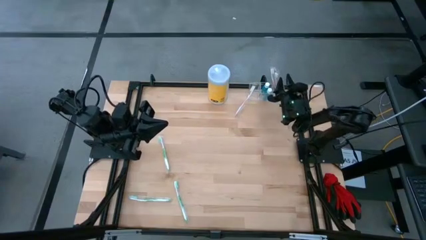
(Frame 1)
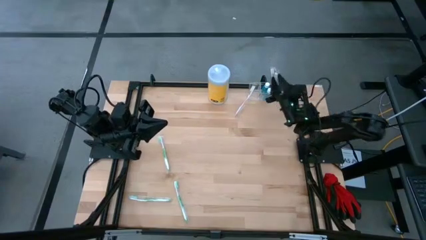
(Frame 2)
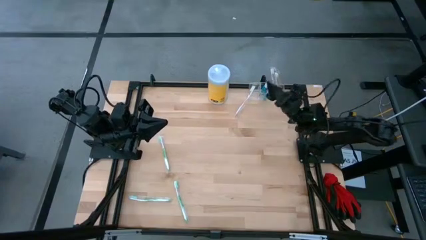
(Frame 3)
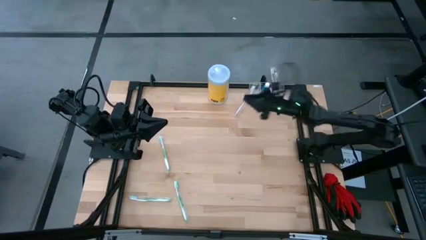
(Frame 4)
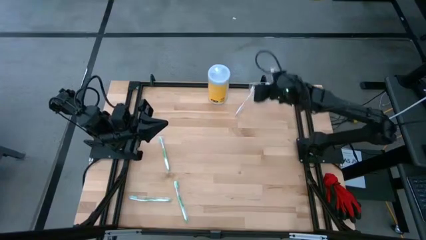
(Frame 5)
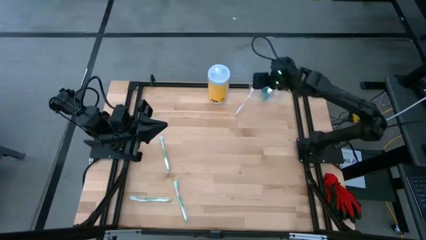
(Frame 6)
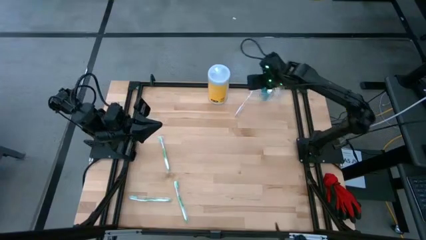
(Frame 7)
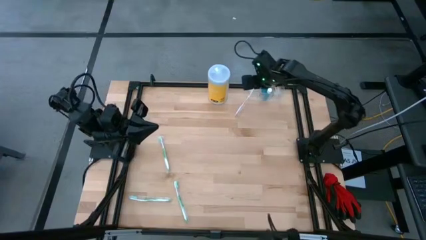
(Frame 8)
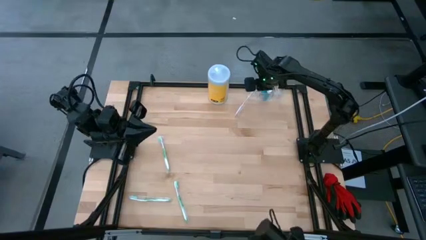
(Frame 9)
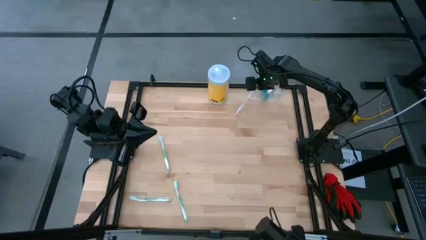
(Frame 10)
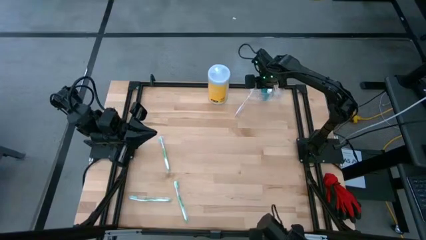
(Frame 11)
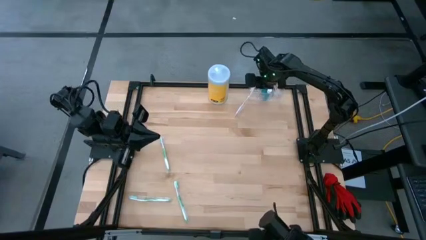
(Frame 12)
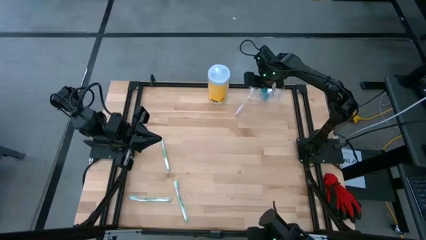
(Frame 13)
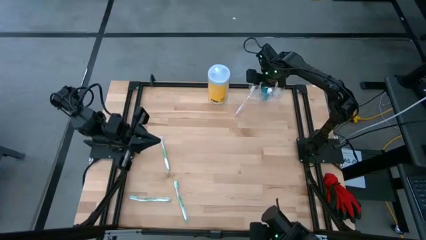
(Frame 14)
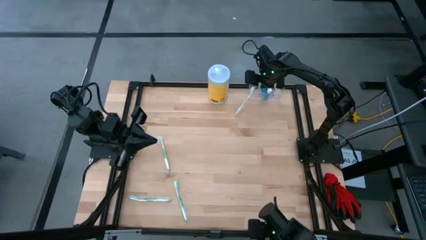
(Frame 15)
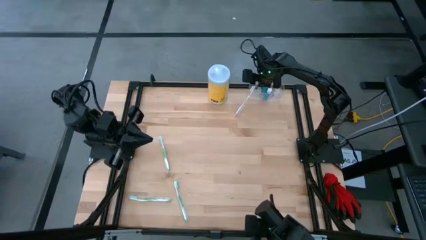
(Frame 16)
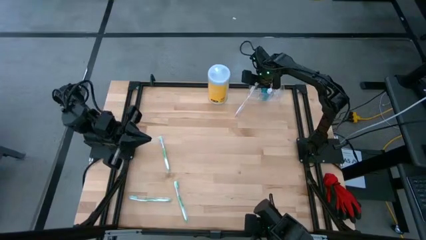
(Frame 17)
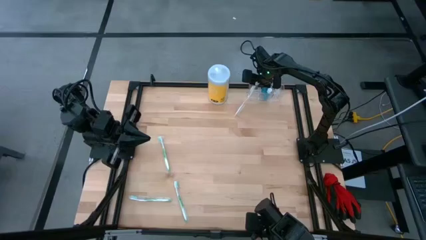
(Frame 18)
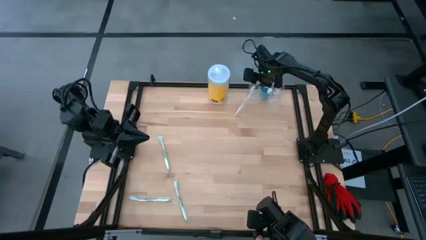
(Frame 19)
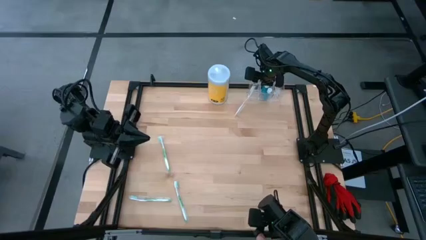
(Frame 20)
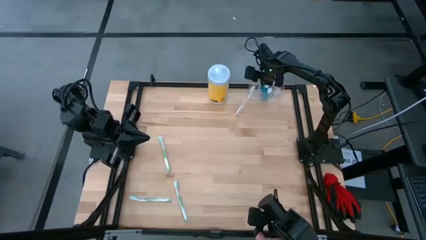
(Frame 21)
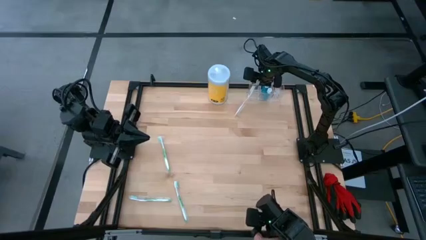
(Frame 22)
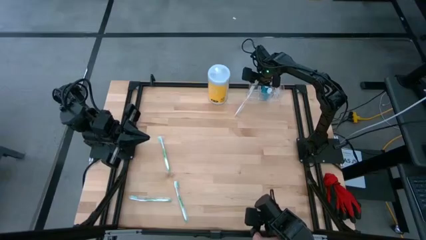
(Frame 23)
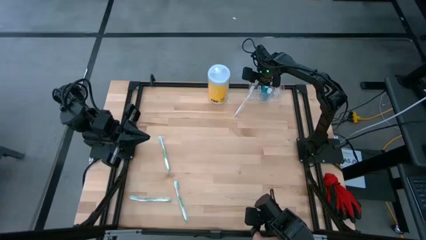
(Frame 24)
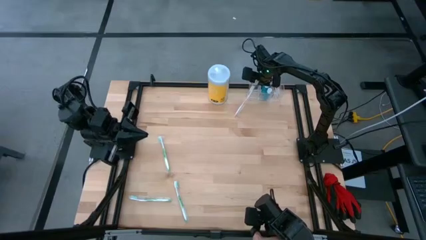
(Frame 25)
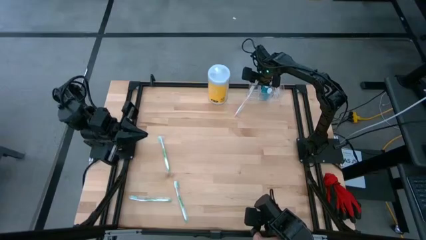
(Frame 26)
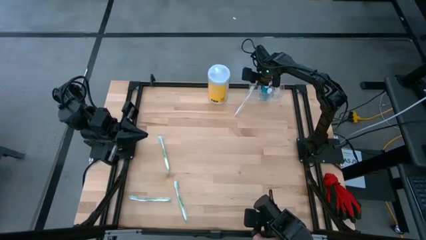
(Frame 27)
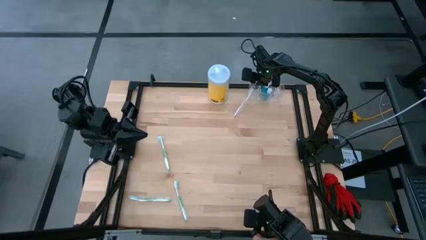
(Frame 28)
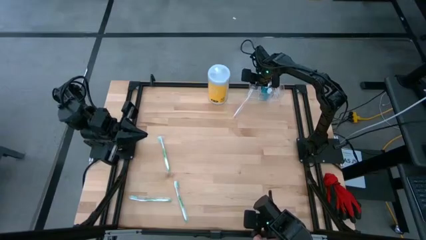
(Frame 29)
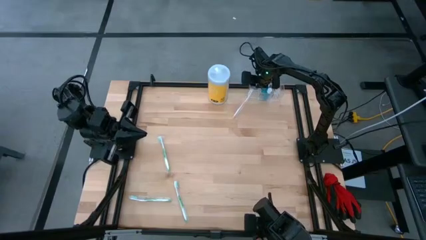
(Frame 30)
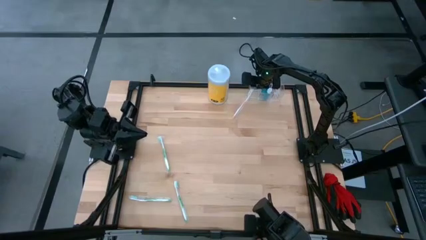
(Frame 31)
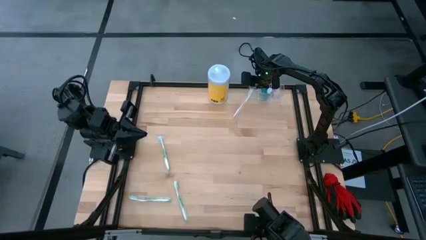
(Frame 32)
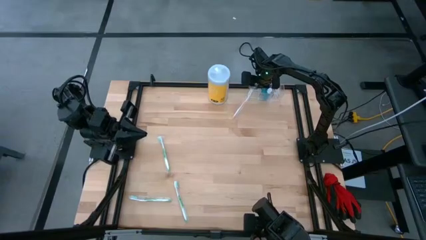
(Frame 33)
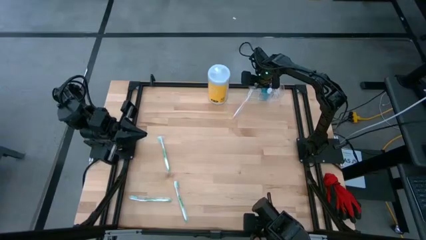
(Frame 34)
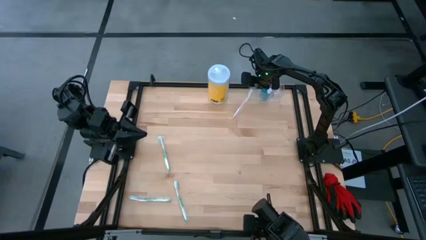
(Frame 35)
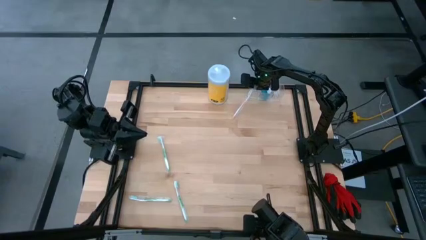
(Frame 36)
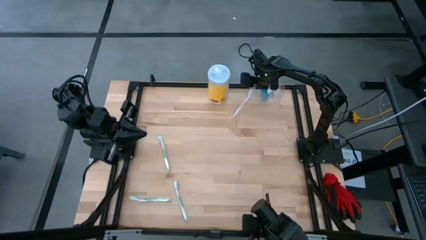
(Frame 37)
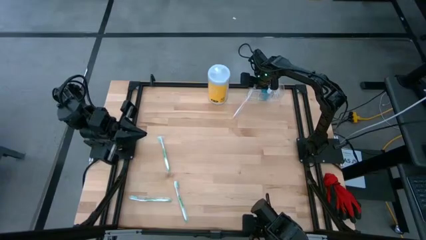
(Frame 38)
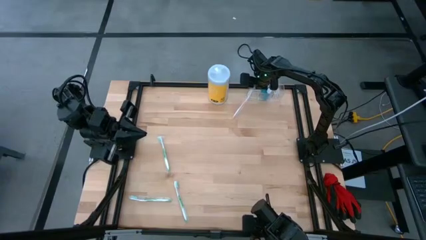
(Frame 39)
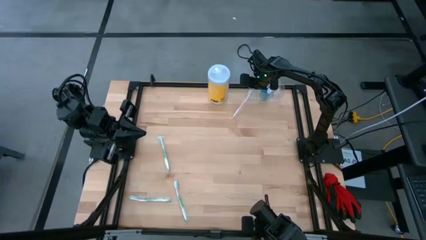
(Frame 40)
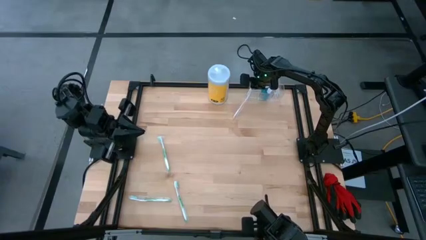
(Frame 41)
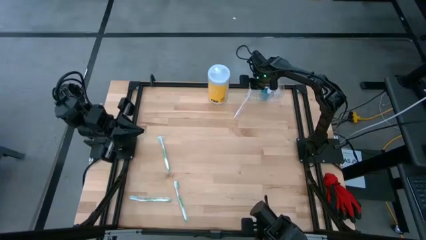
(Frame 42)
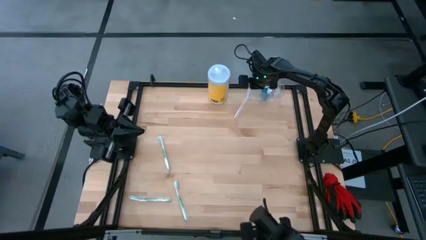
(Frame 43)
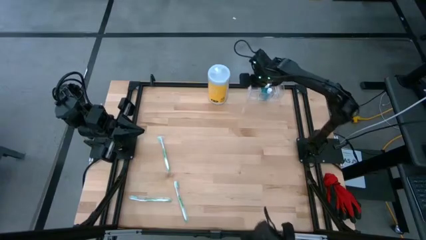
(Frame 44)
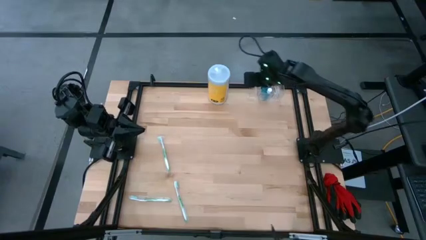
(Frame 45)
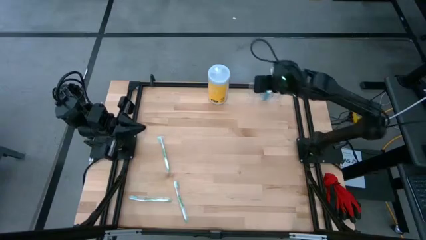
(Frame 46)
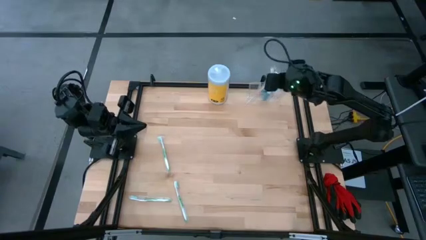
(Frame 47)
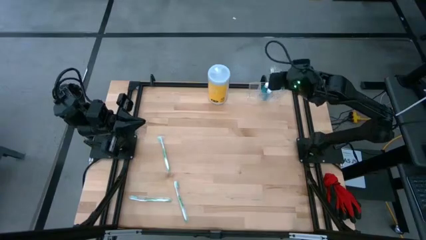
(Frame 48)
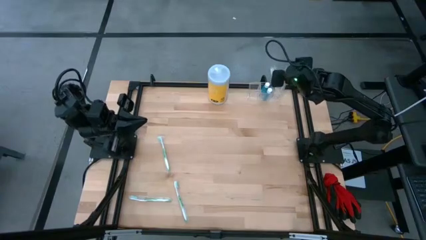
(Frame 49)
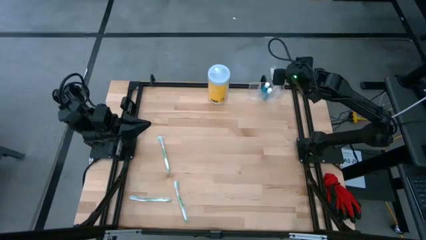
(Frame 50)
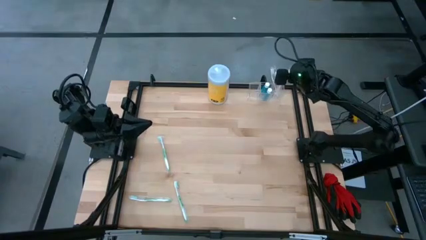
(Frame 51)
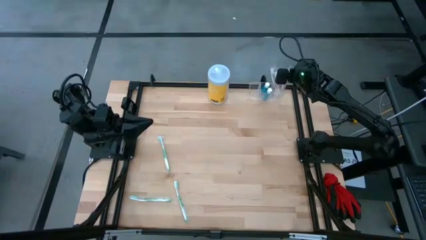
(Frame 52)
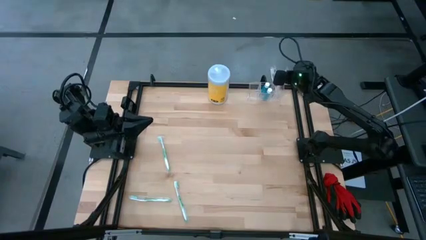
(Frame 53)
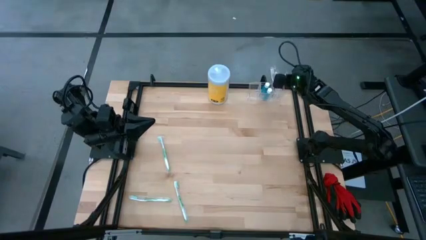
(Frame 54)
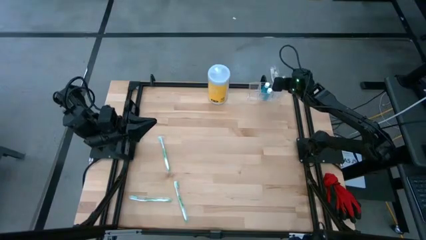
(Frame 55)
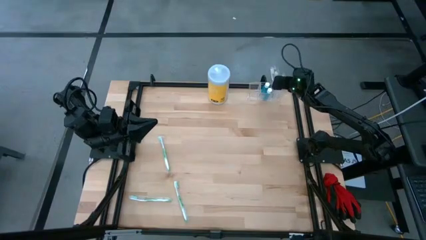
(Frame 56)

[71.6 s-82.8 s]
Task: Pick & Place toothbrushing station
Put the orange toothbrush into the transparent organizer

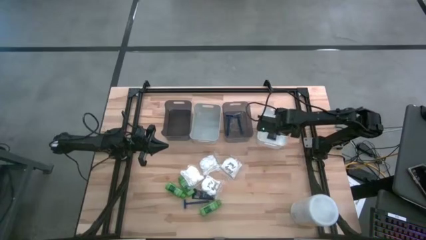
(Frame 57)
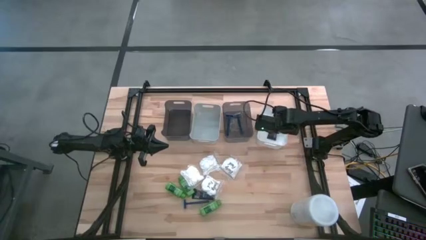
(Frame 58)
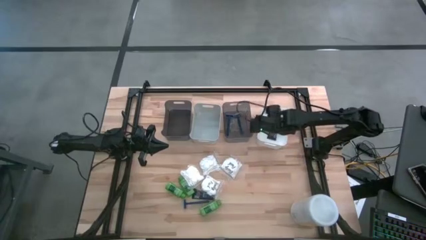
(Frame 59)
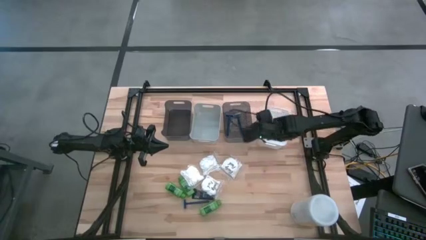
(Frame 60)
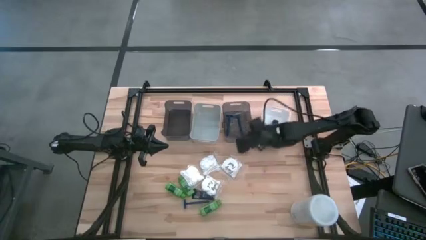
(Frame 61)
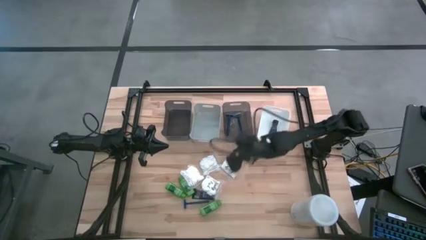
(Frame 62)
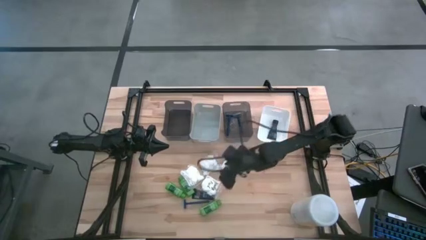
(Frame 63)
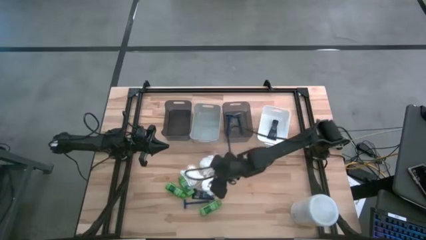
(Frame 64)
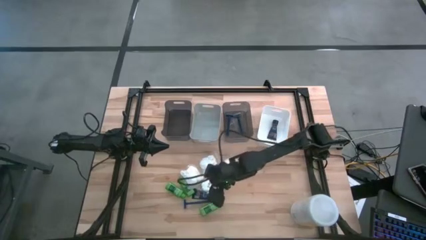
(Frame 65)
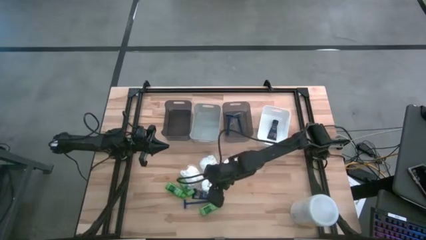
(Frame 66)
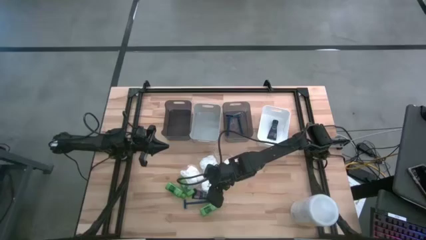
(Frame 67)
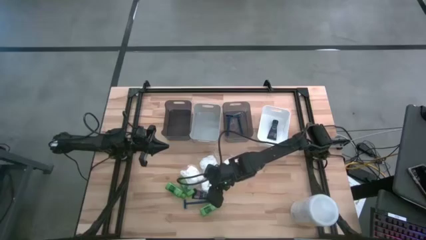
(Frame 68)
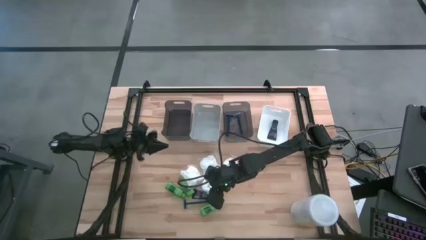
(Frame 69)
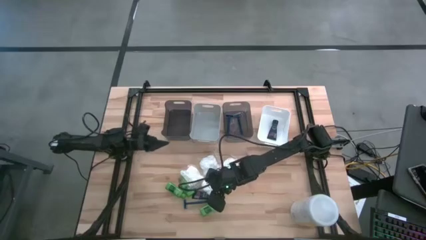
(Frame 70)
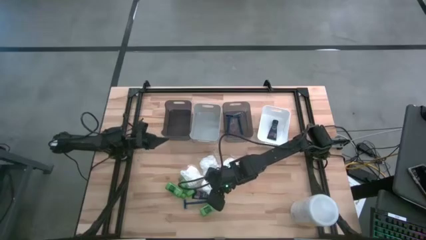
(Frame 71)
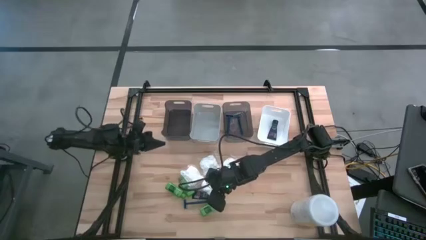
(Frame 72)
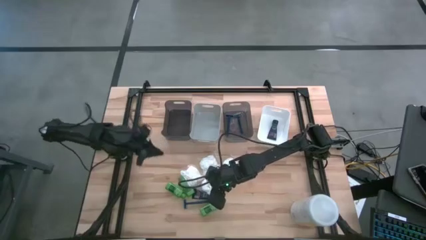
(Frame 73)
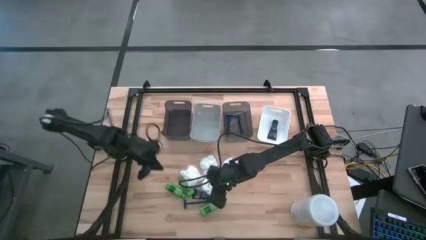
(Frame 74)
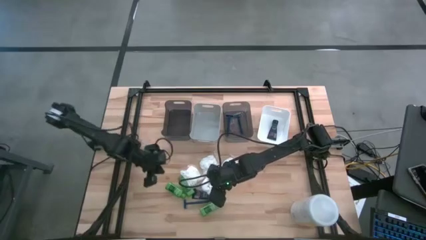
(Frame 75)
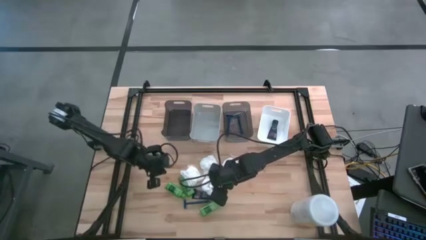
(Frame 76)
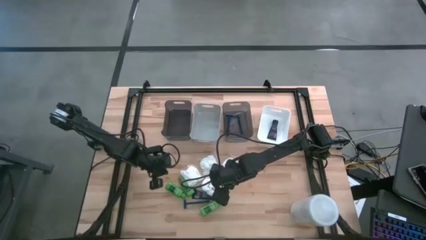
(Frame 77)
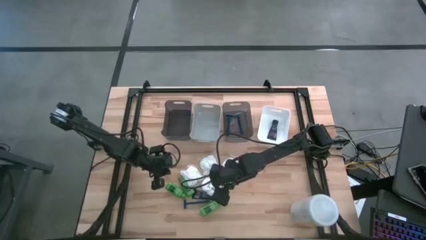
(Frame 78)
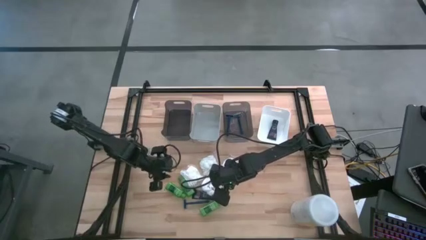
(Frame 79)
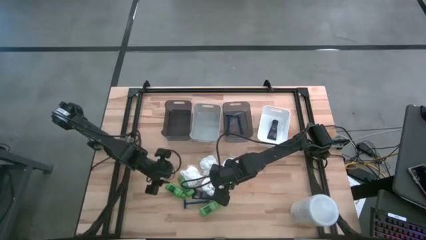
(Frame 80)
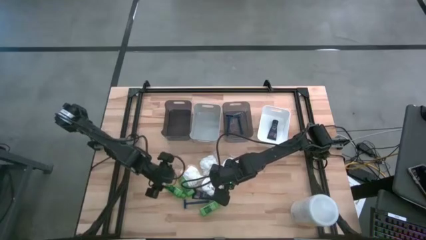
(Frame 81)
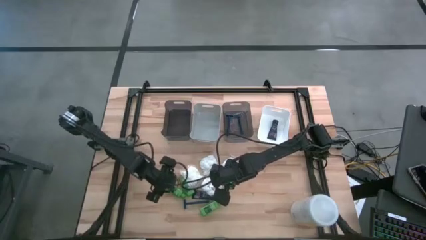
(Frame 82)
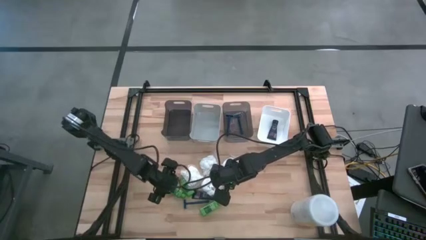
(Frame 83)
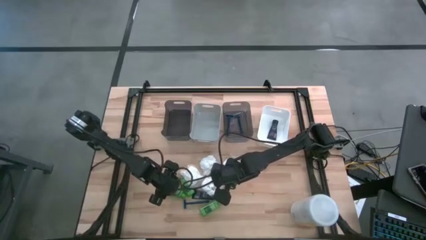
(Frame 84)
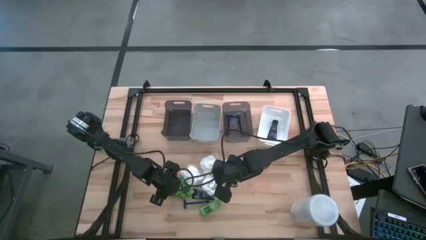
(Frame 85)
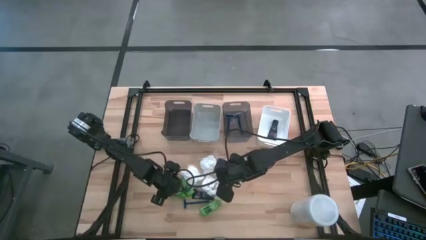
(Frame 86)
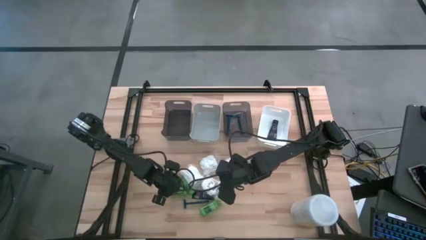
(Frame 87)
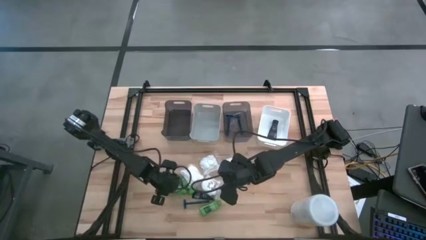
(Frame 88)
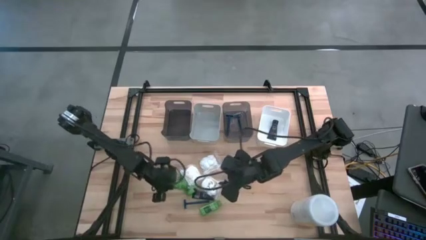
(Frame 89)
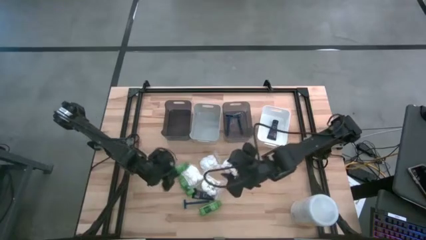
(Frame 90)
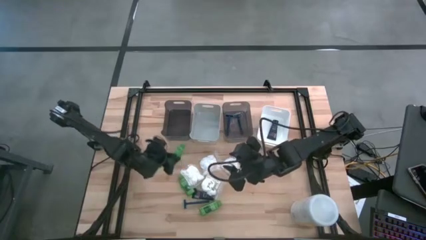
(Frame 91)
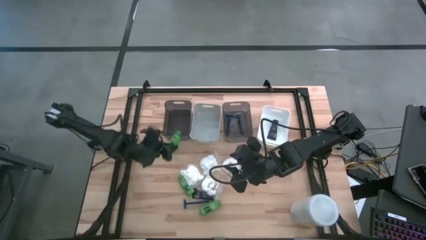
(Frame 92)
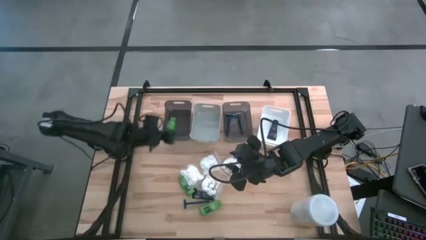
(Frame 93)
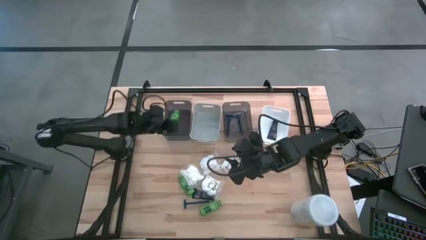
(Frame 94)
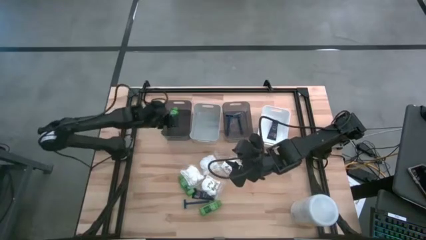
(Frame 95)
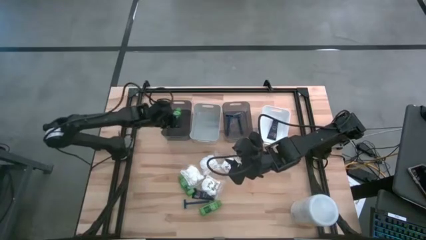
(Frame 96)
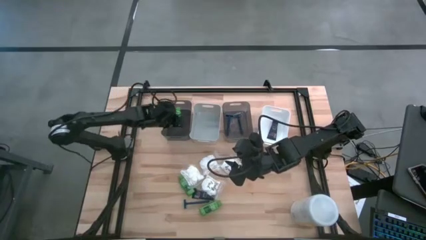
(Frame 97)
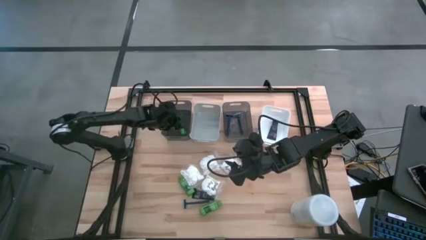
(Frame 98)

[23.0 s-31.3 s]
Task: Pick & Place Travel size toiletries
Put the green shampoo into the left black bin
